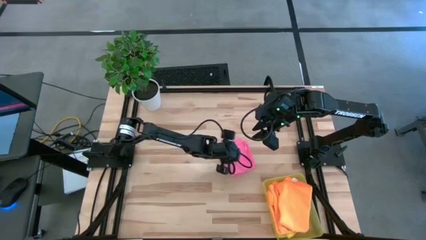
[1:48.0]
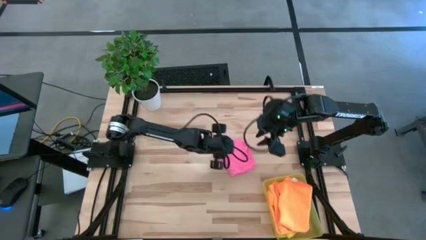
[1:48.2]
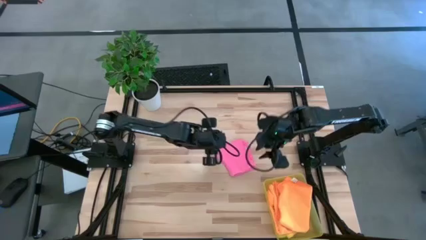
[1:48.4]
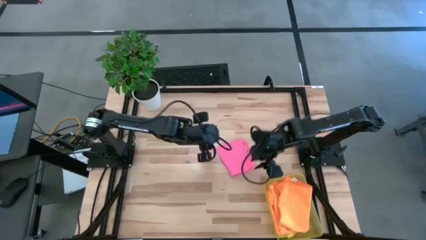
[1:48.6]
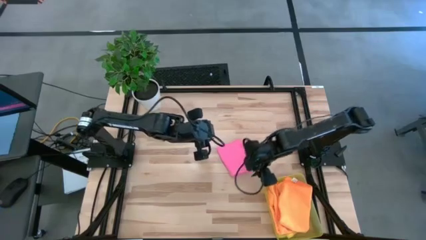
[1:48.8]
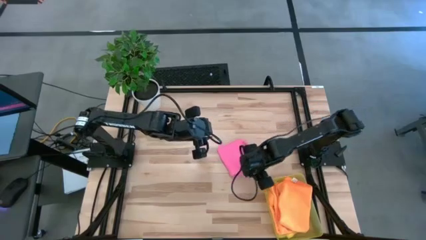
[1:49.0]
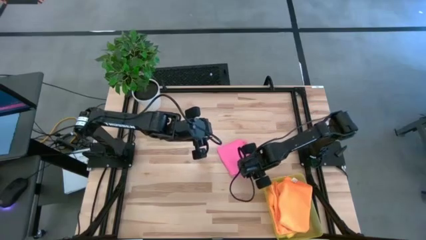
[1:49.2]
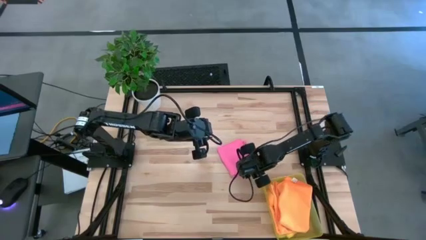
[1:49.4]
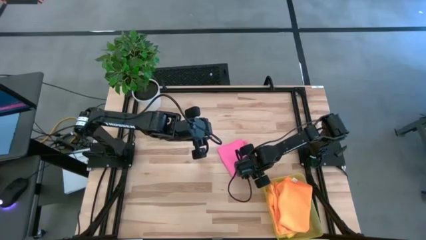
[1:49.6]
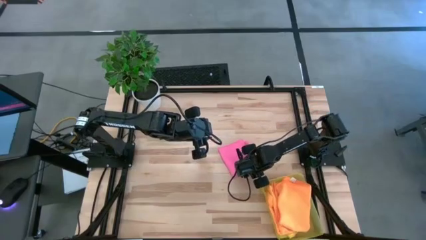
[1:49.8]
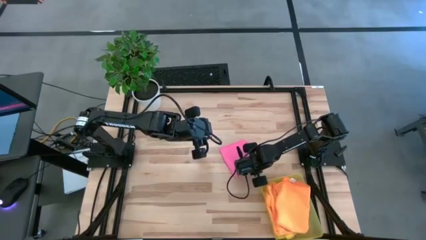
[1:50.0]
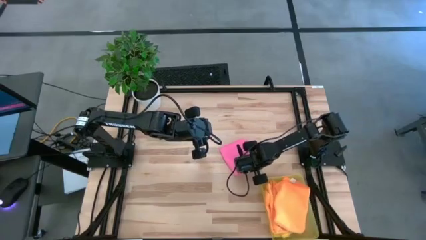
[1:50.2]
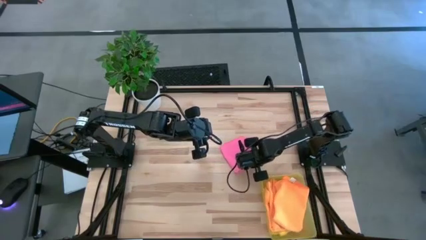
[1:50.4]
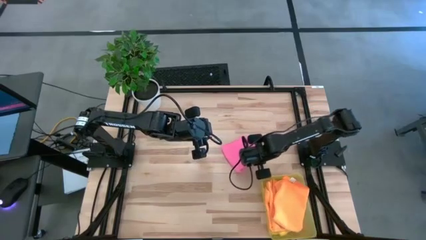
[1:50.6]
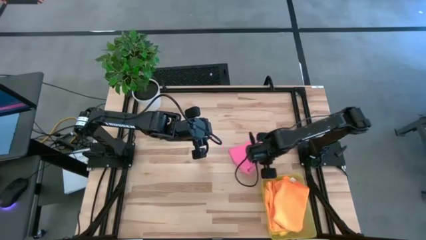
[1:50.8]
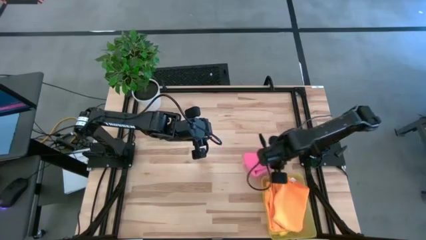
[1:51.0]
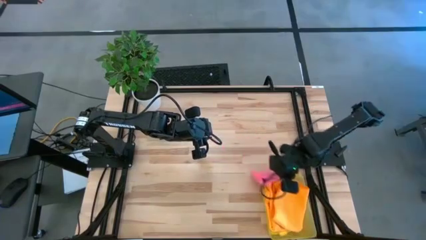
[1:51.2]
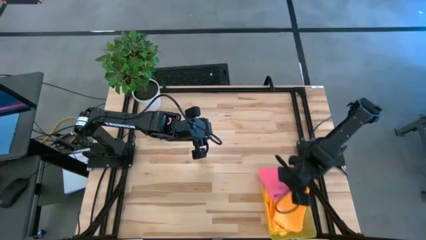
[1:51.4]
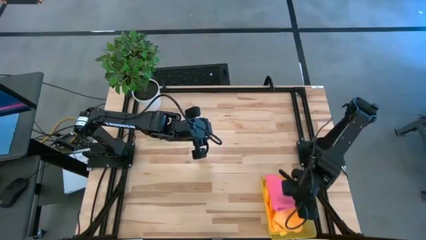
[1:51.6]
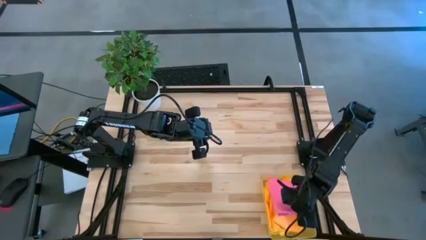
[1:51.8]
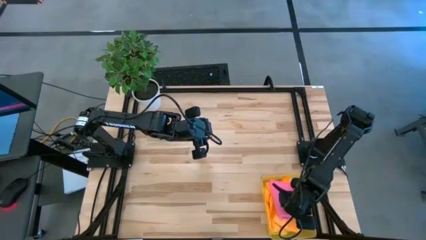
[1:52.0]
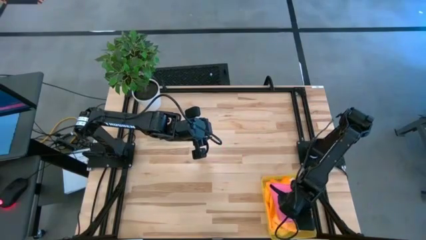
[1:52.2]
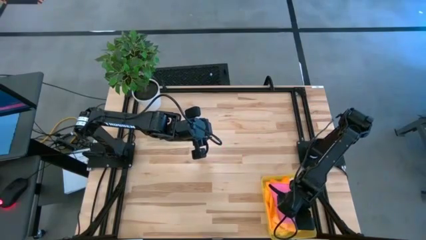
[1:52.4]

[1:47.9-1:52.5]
Task: Fold microfiber towels
Stack the folded pink cloth on top of the folded orange cloth in the yellow bin

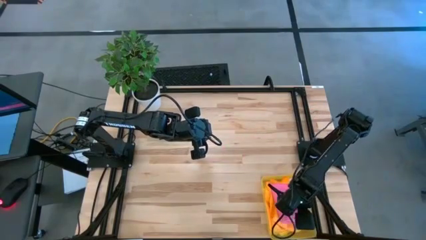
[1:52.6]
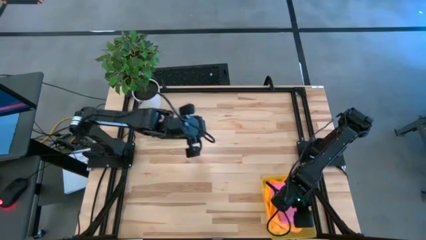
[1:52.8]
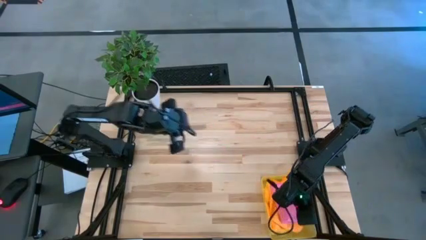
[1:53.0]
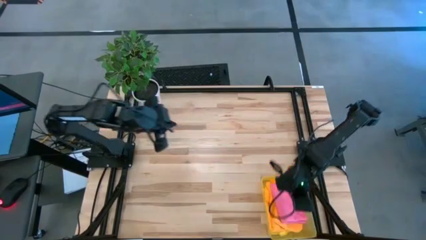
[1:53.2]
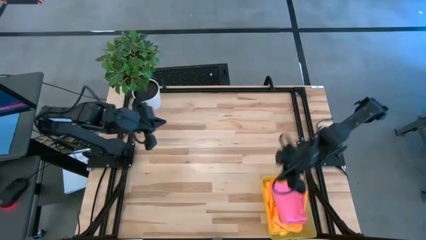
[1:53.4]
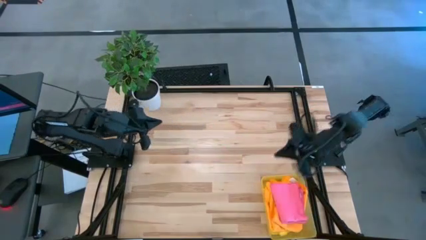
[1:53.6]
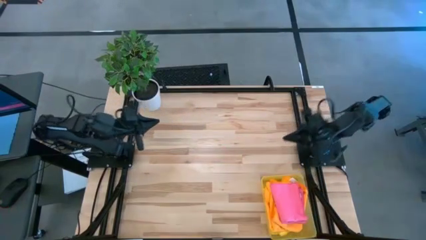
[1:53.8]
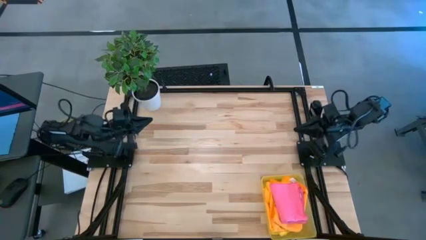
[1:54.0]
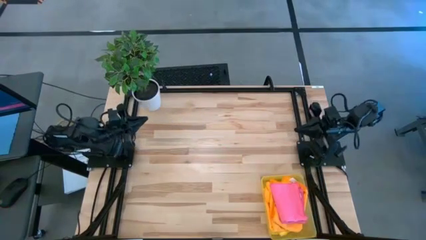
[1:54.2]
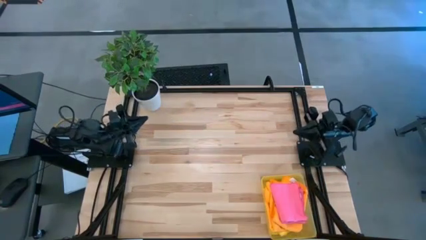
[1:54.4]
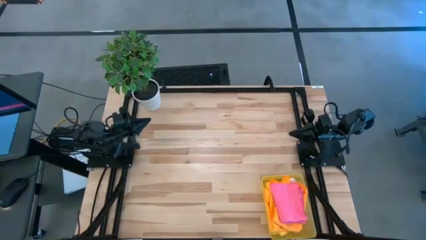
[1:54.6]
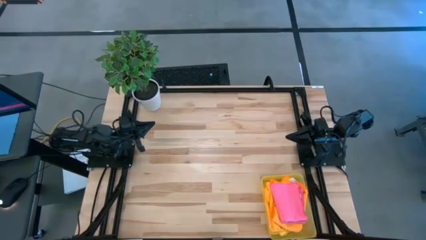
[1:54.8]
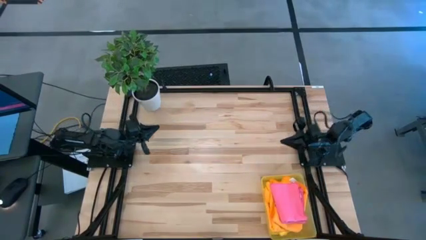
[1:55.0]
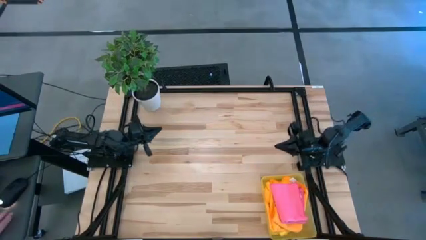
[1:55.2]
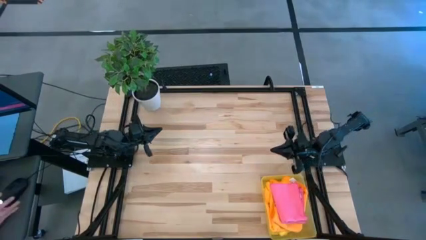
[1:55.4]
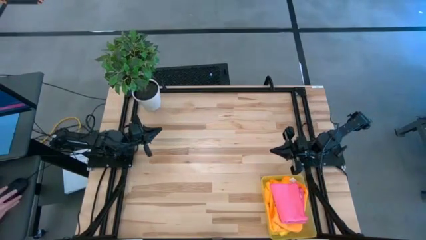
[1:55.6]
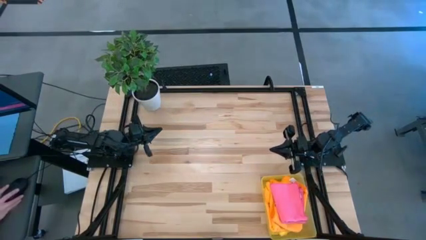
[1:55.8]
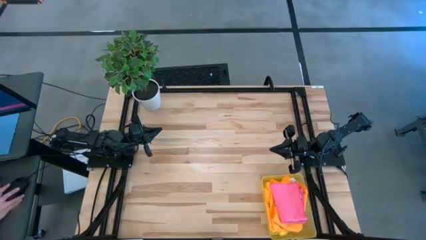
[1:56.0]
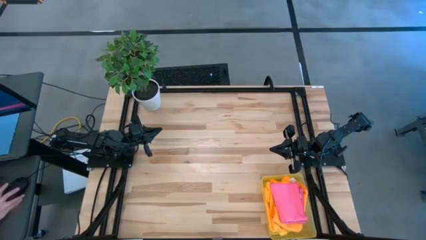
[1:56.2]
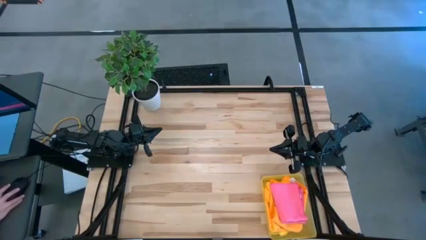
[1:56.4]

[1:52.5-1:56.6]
Return to Home Position

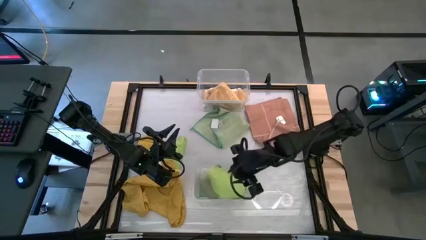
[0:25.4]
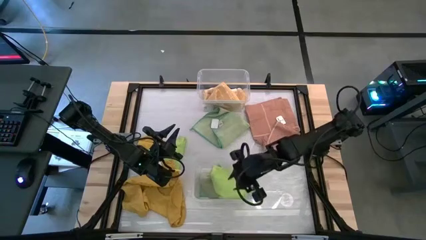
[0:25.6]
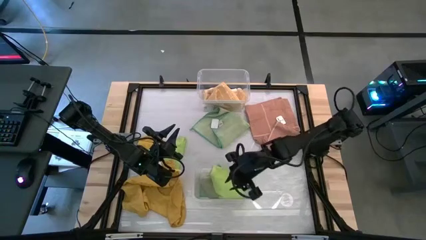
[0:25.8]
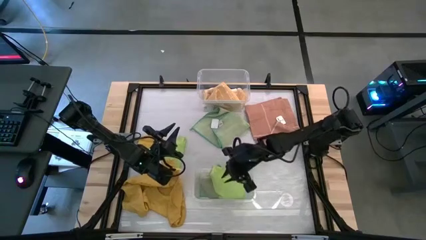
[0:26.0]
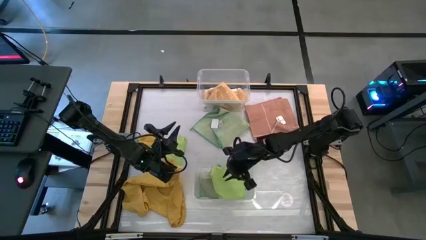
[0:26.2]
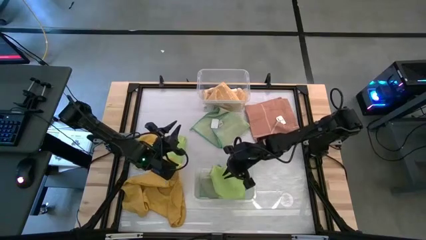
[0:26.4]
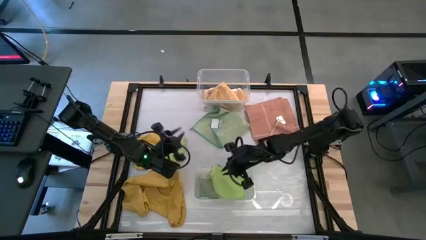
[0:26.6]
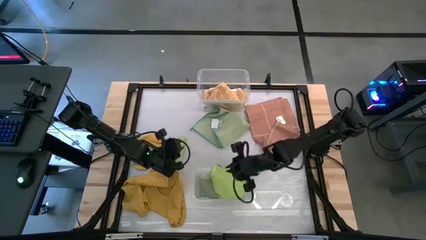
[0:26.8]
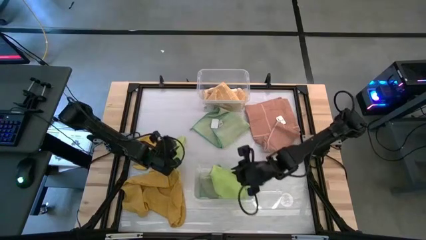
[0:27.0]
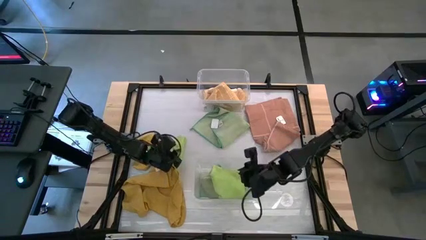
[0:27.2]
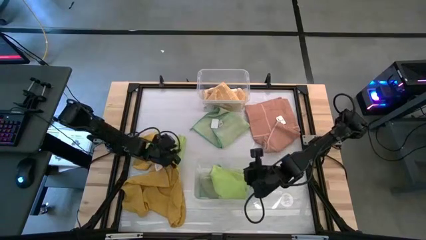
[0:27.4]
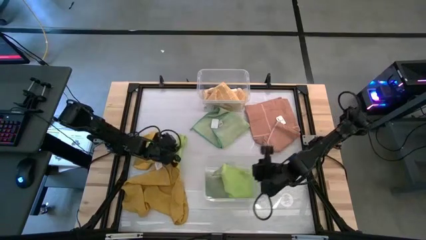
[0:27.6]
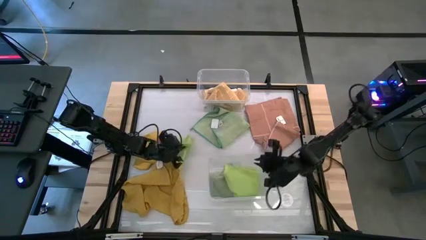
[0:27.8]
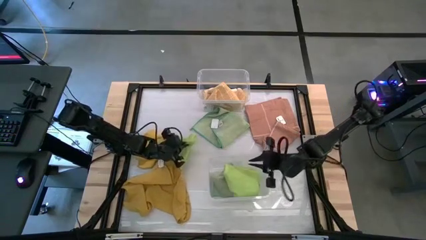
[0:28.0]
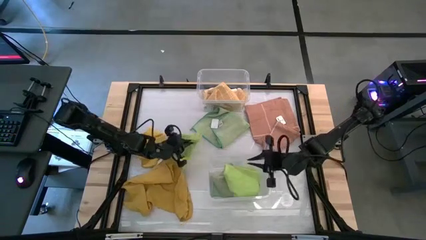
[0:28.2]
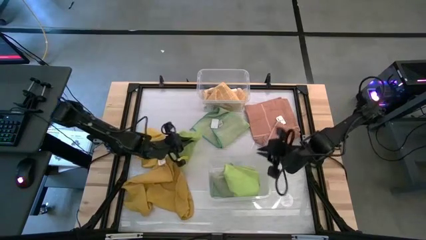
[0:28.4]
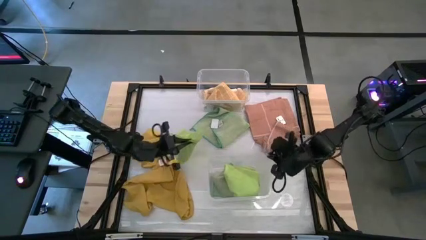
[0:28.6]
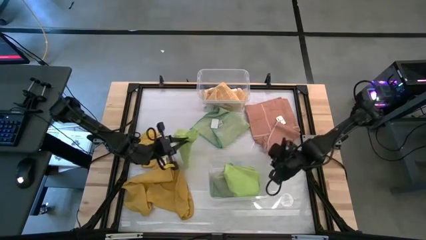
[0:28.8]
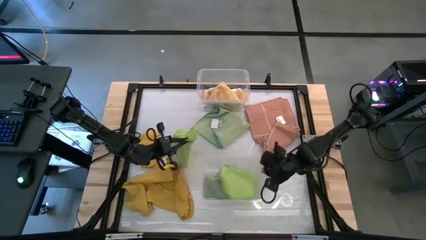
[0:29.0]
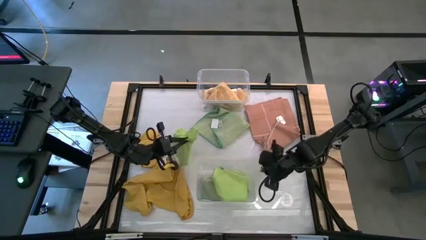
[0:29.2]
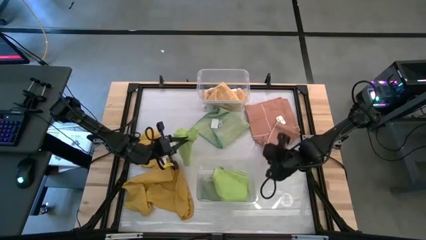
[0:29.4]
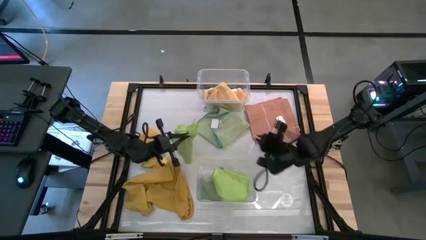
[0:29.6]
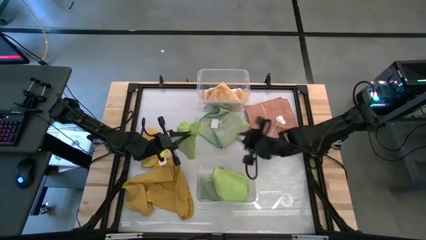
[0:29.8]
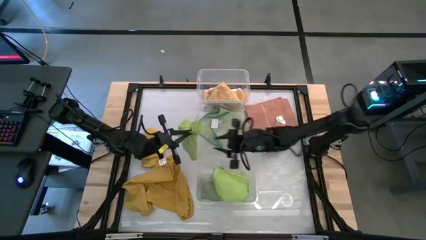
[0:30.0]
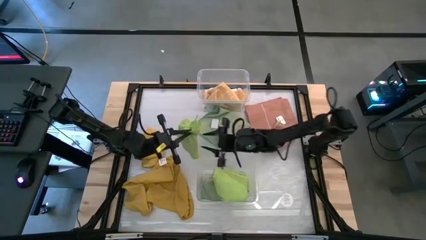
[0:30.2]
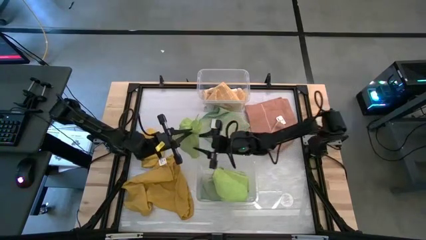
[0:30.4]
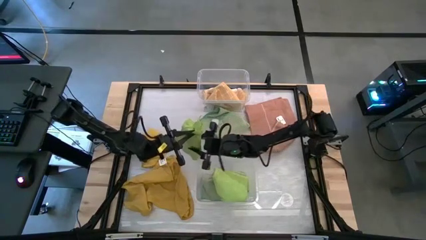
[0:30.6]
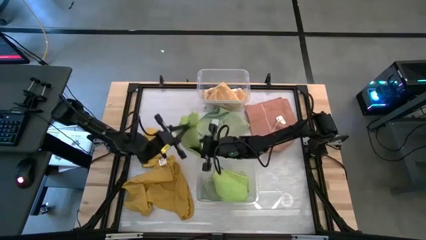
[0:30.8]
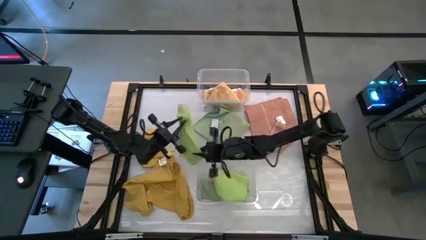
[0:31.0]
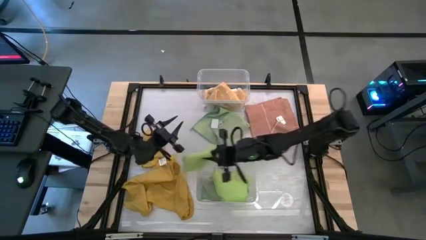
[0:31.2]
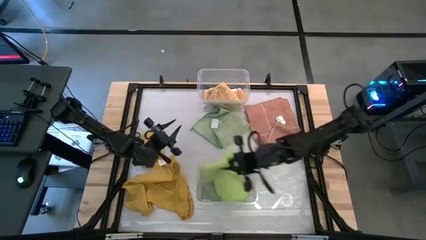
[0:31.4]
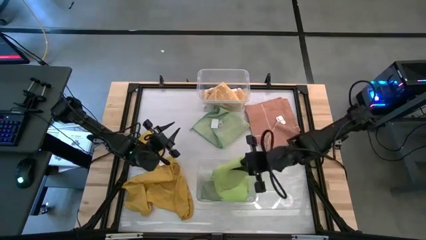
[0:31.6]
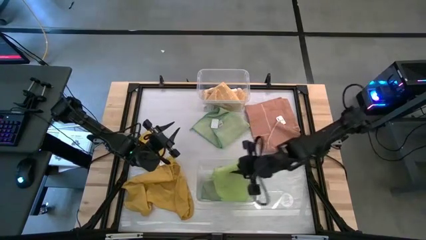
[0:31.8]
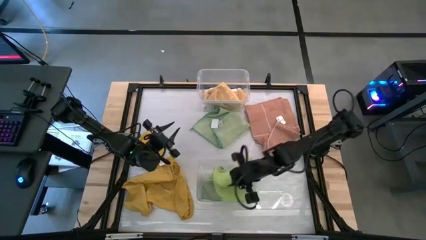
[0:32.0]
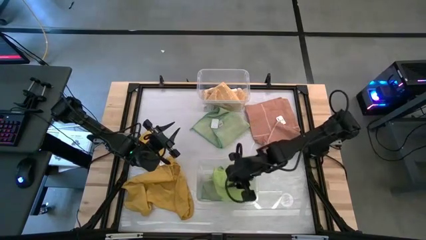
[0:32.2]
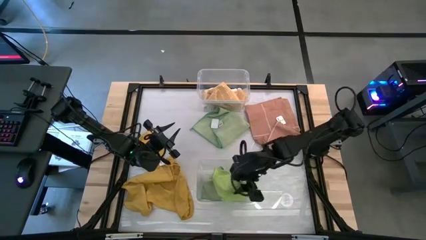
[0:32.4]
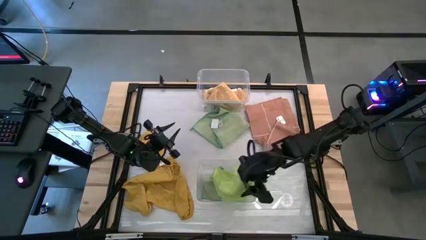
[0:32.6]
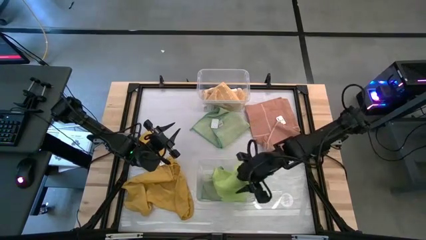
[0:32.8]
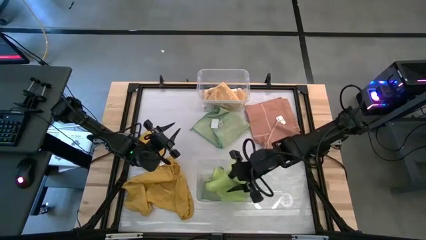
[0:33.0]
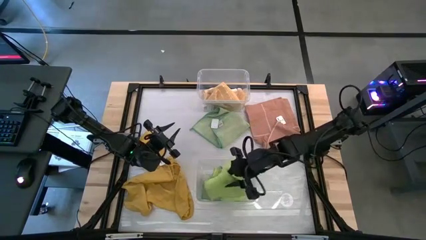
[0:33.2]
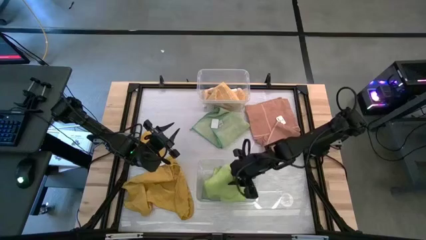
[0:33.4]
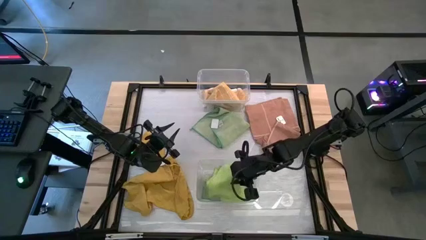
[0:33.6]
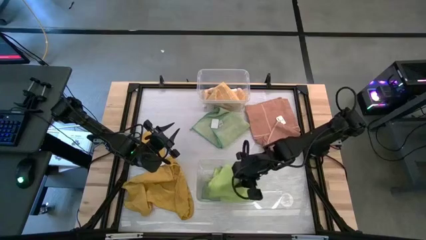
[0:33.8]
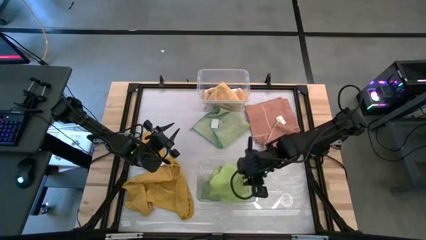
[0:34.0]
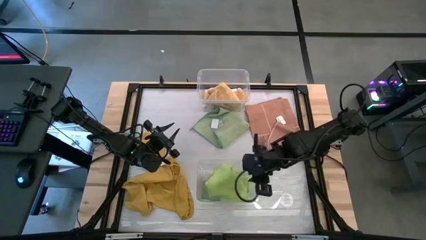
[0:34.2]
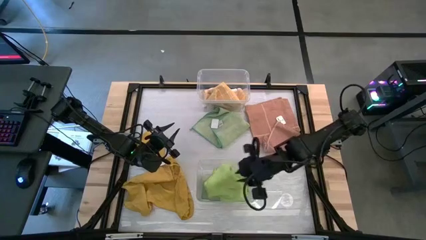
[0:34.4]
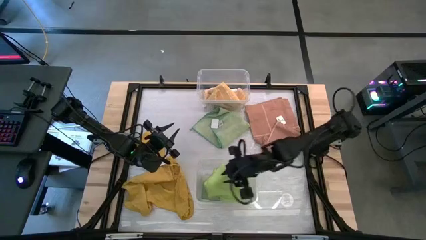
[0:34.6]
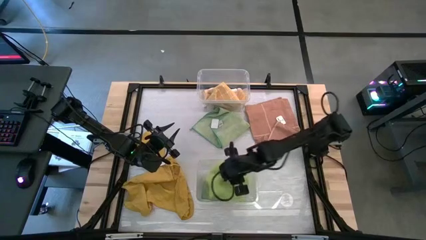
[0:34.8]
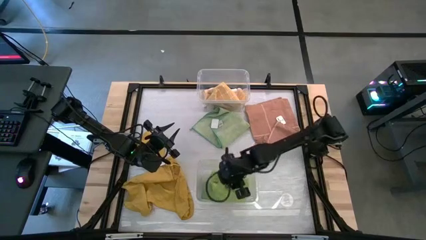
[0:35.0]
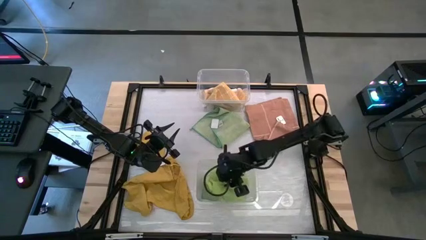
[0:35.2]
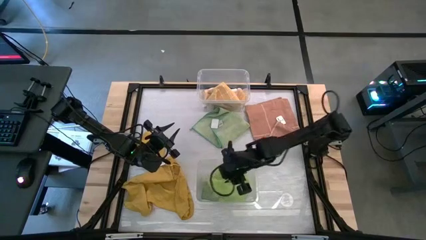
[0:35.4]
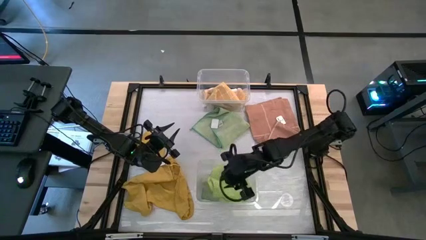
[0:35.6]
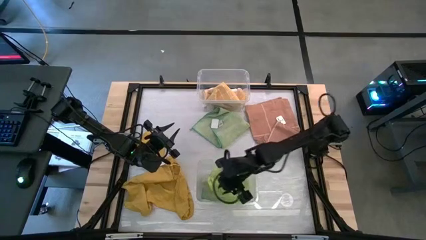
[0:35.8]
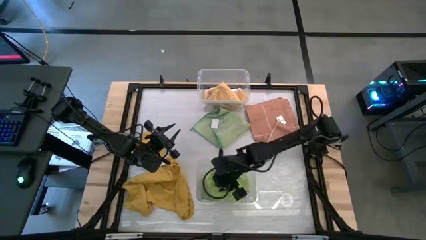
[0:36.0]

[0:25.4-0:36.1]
Task: Sort towels by color in basket
Put the light green towel into the bottom transparent bin
